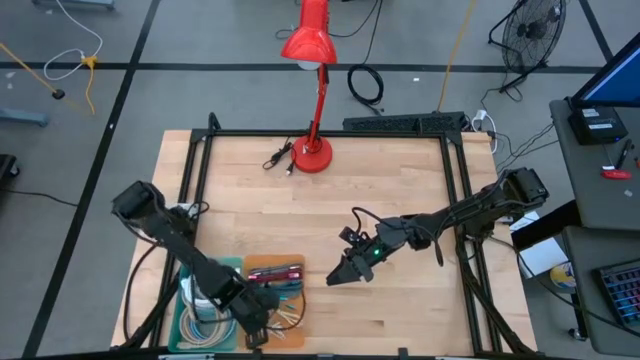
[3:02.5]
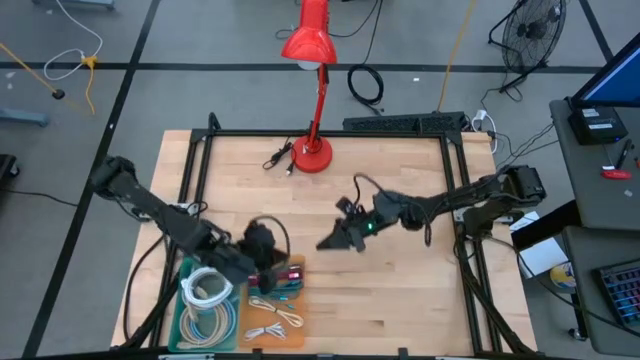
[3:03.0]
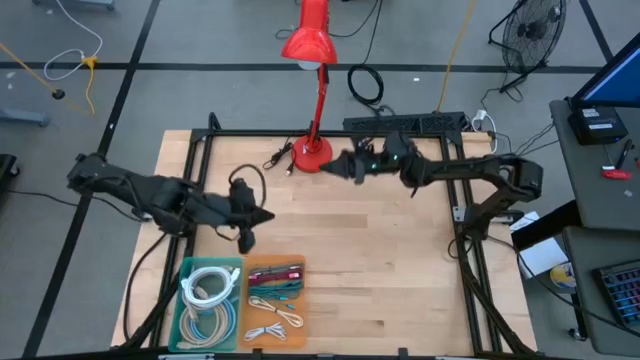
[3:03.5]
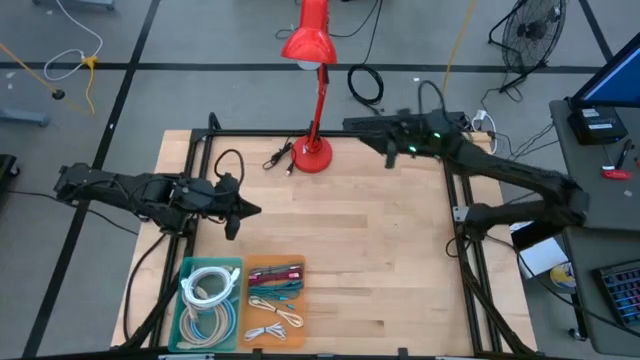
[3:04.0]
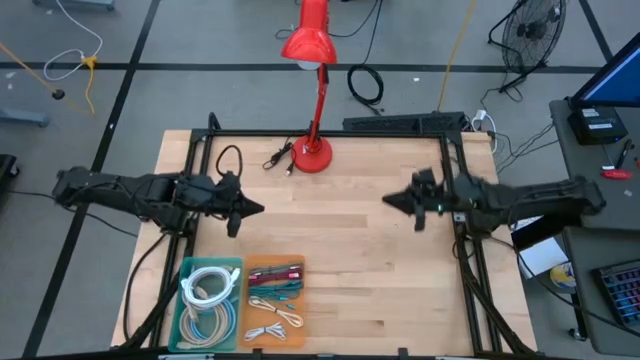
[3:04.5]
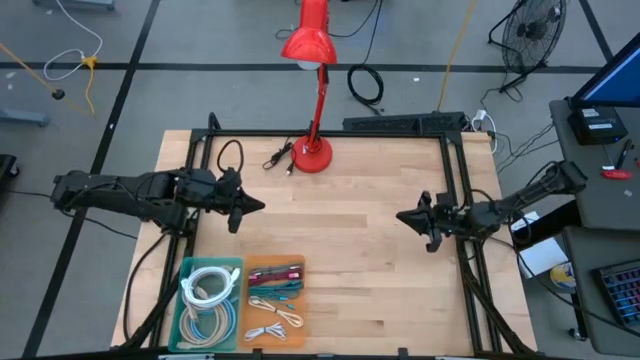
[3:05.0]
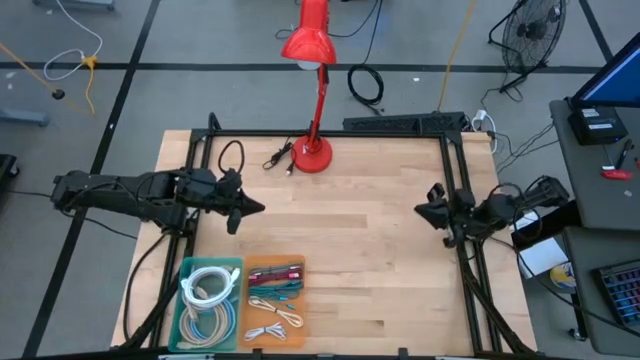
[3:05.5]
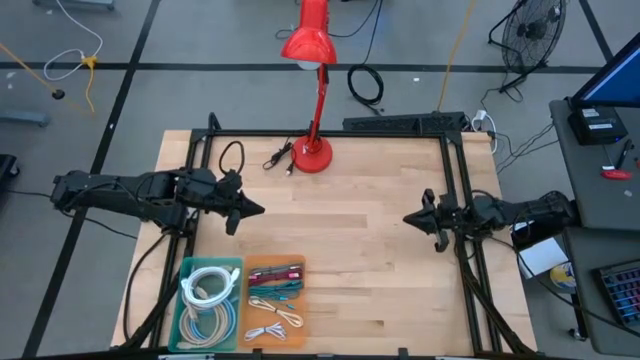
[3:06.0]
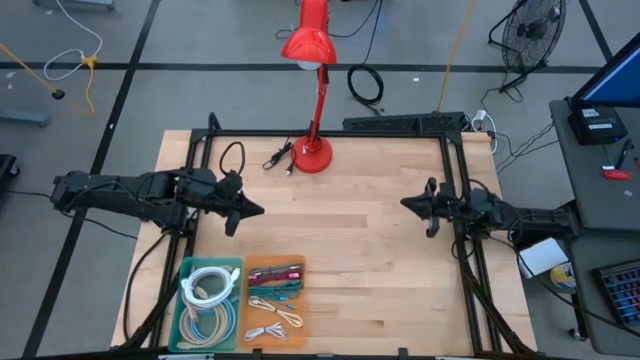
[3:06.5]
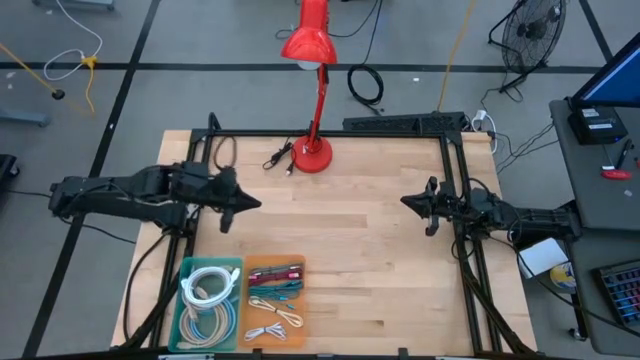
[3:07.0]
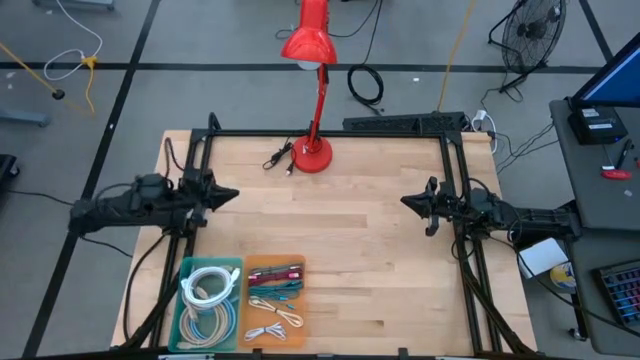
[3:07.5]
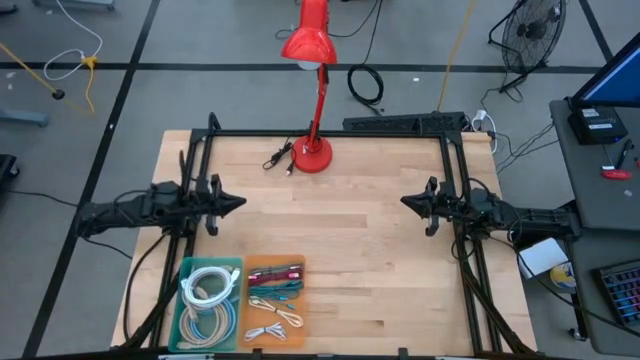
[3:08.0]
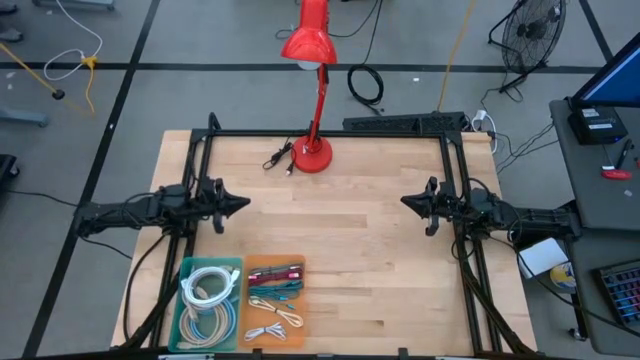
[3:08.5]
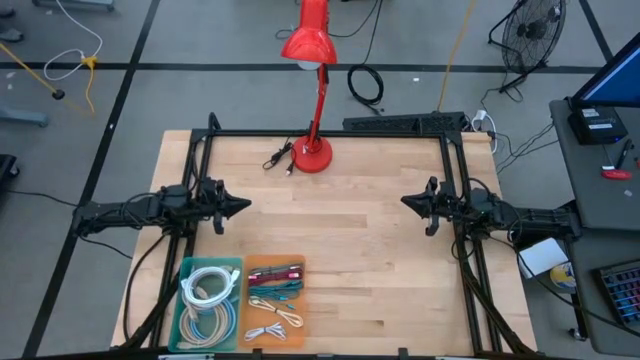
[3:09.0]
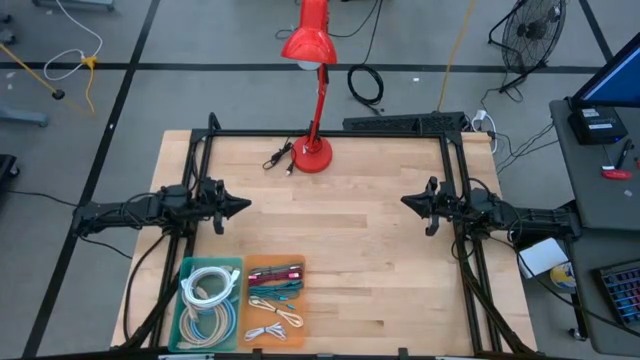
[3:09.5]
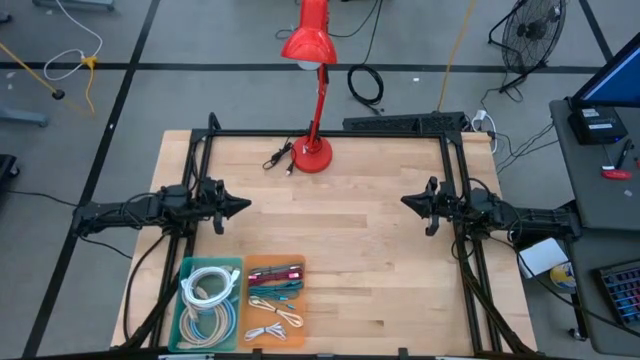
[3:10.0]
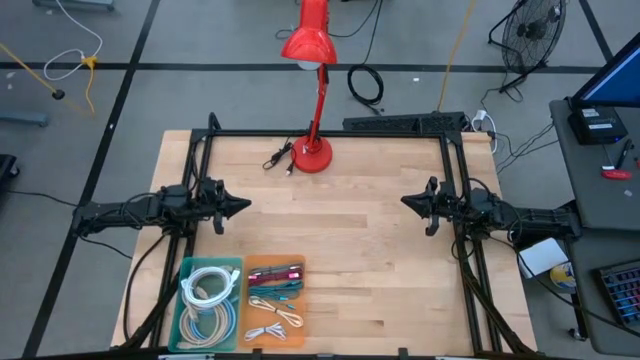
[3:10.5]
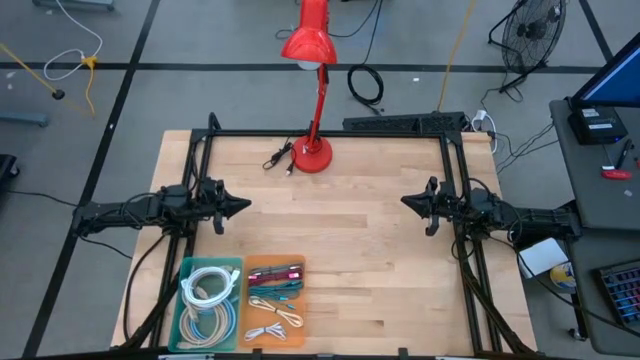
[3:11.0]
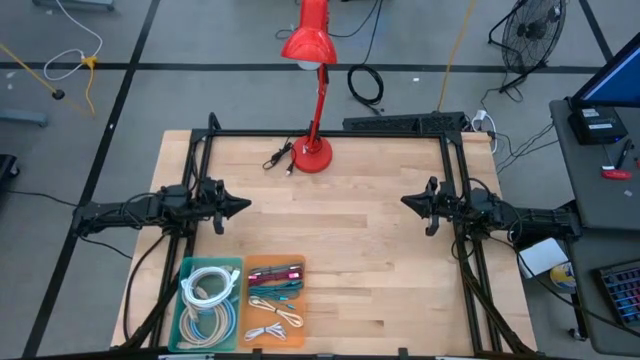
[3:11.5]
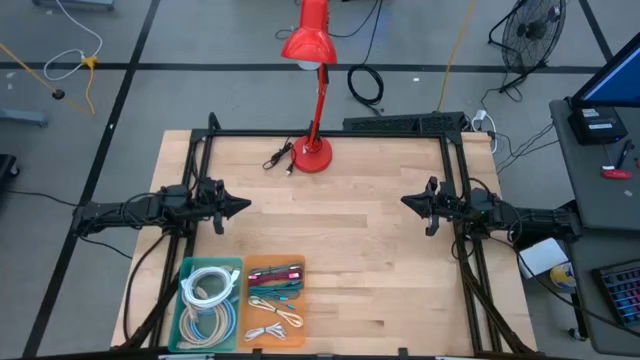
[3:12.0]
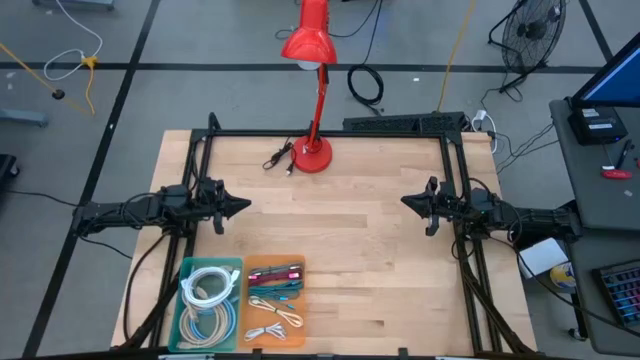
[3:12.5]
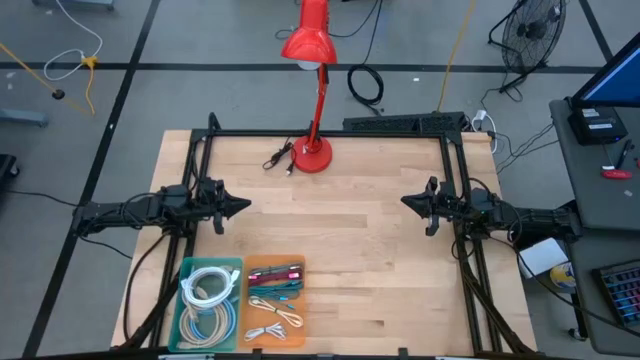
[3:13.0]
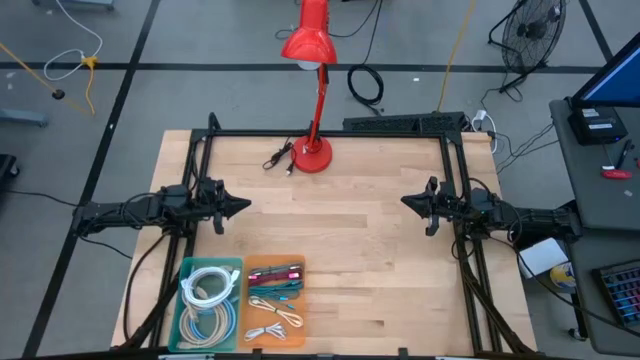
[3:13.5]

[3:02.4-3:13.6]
Task: Pick & Place USB Port
Return to Home Position

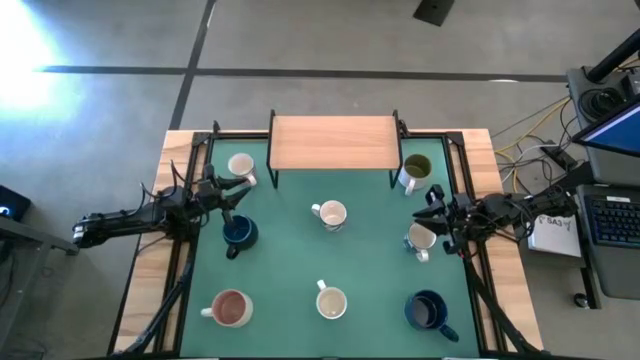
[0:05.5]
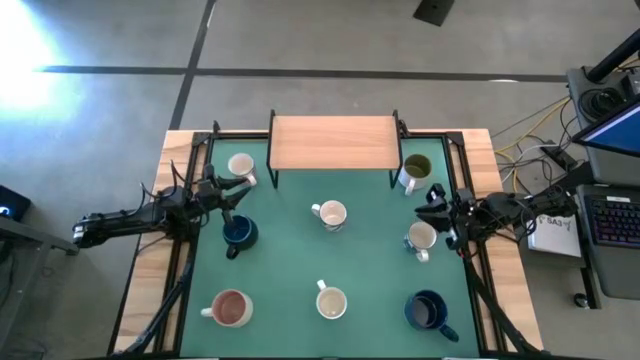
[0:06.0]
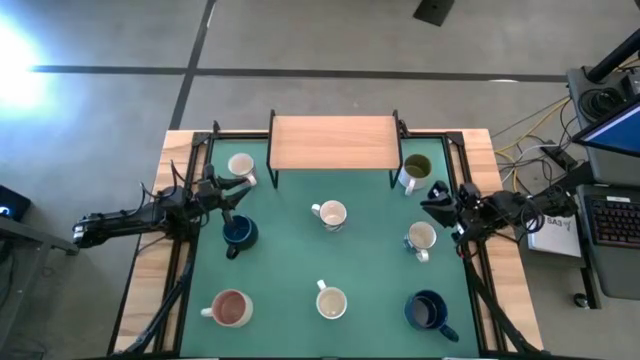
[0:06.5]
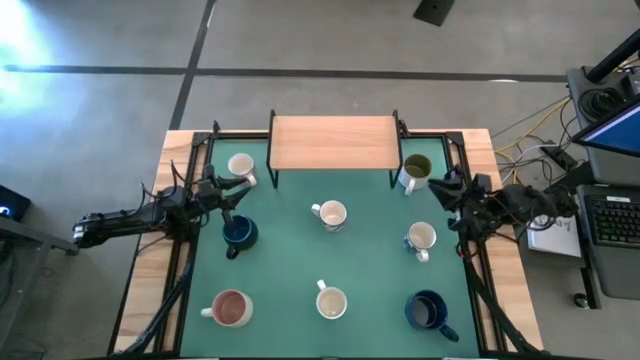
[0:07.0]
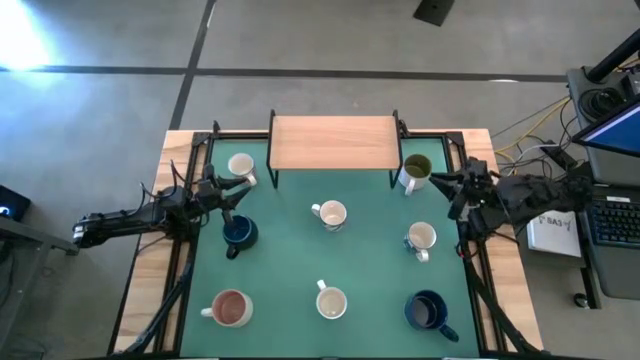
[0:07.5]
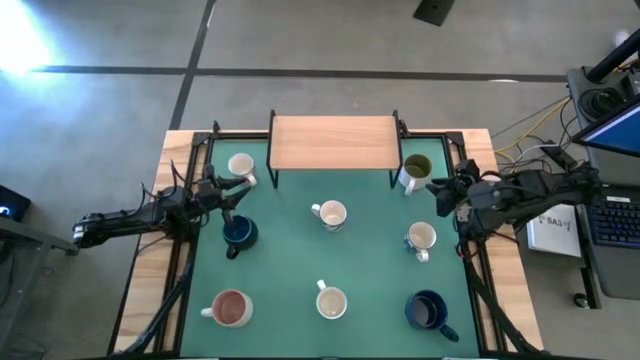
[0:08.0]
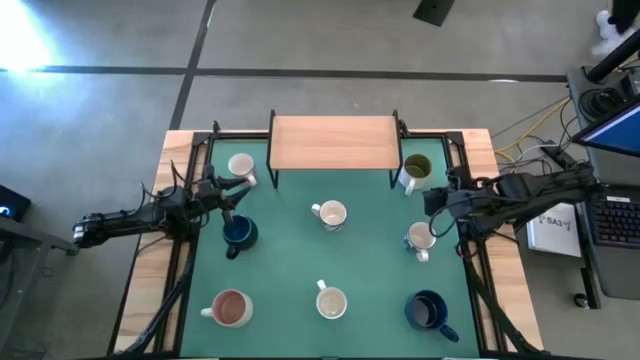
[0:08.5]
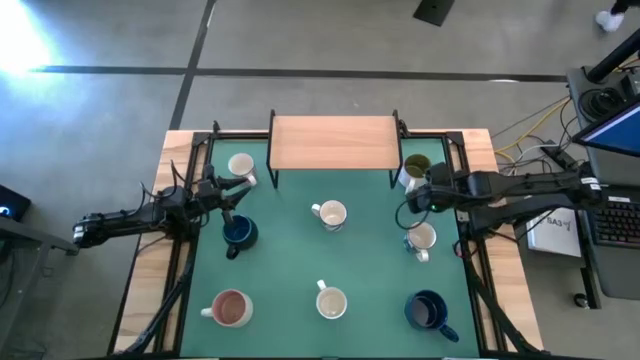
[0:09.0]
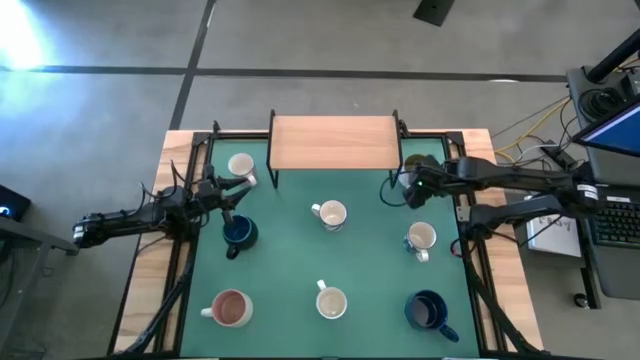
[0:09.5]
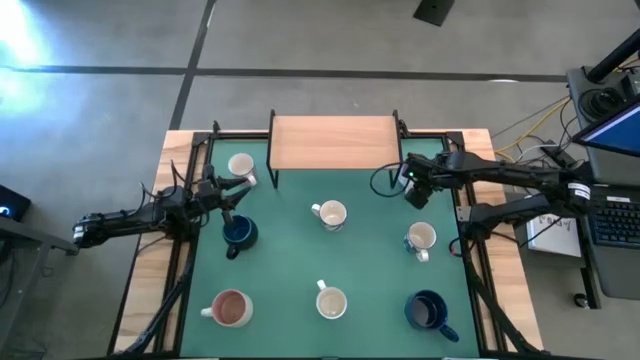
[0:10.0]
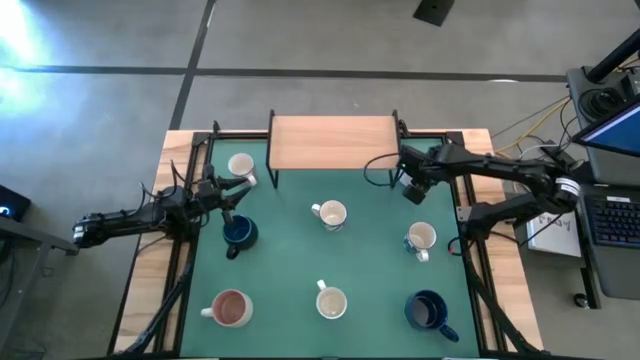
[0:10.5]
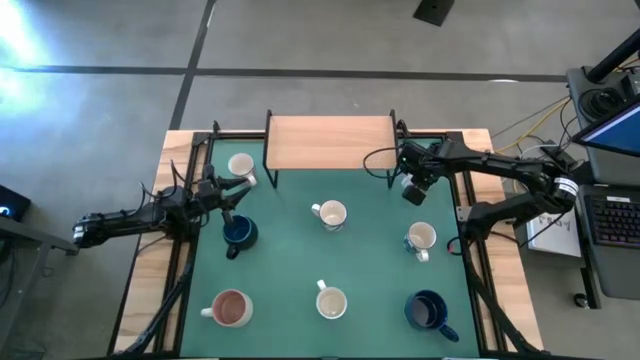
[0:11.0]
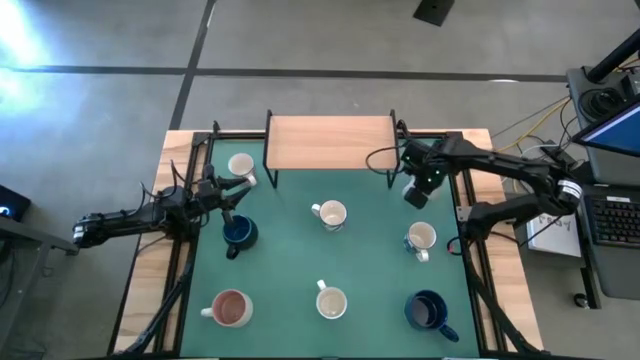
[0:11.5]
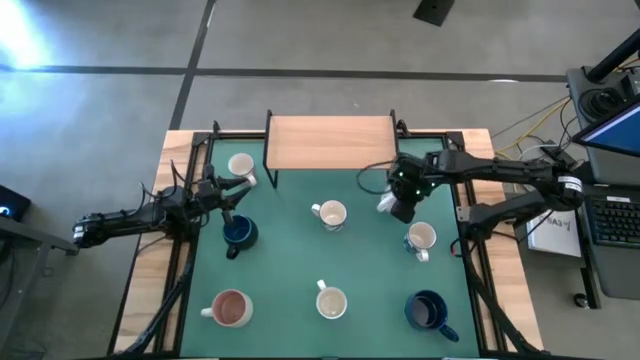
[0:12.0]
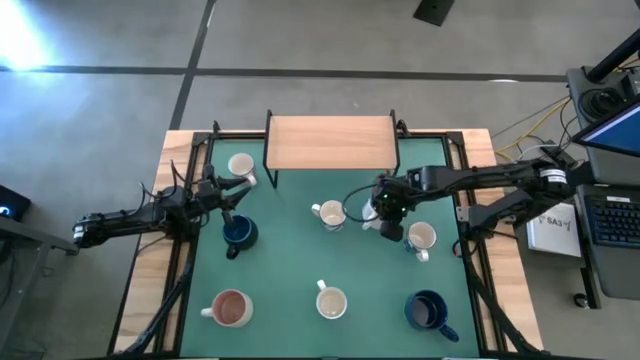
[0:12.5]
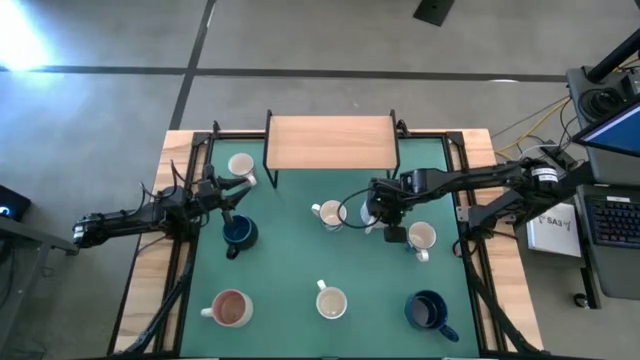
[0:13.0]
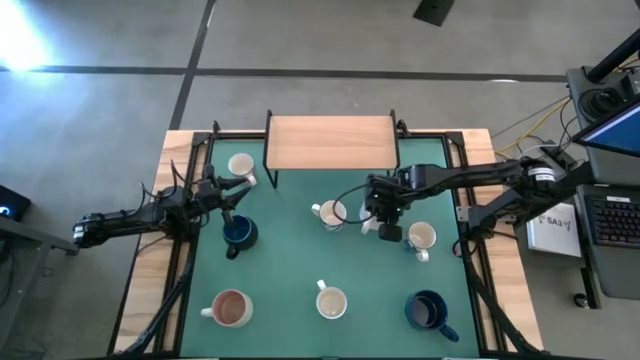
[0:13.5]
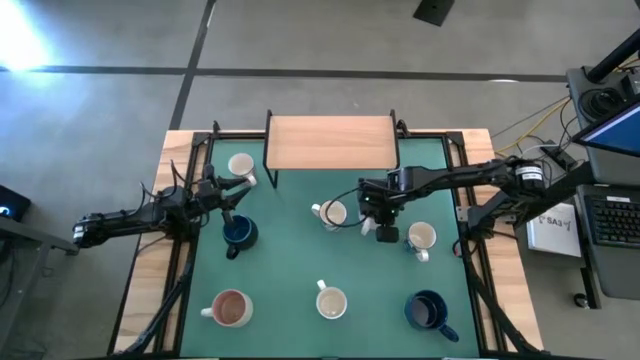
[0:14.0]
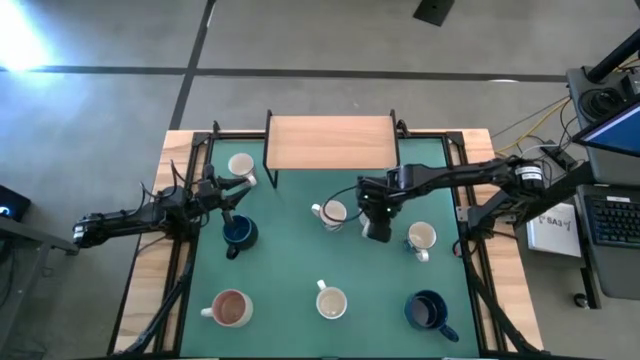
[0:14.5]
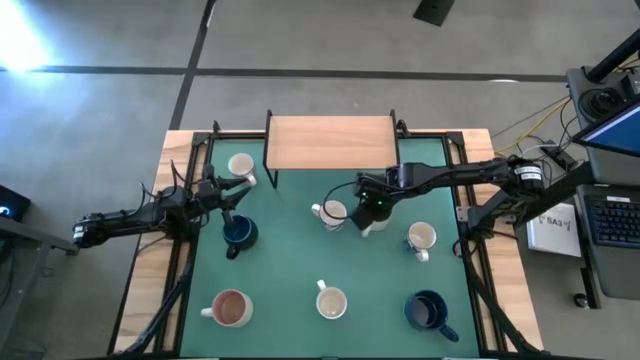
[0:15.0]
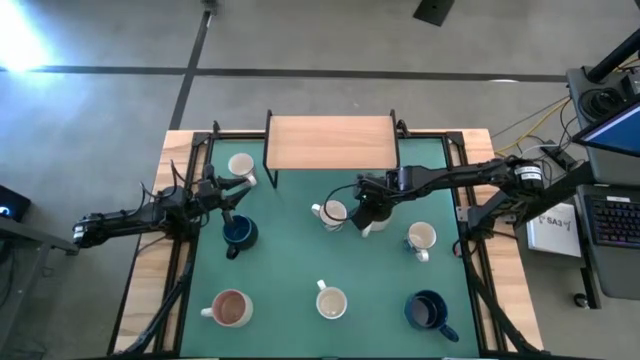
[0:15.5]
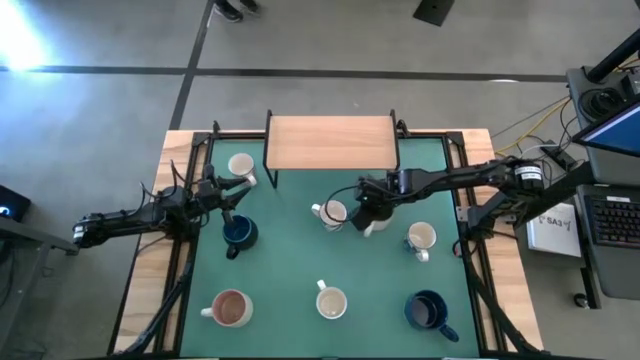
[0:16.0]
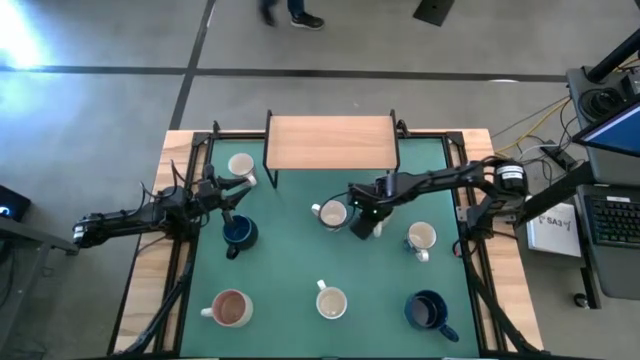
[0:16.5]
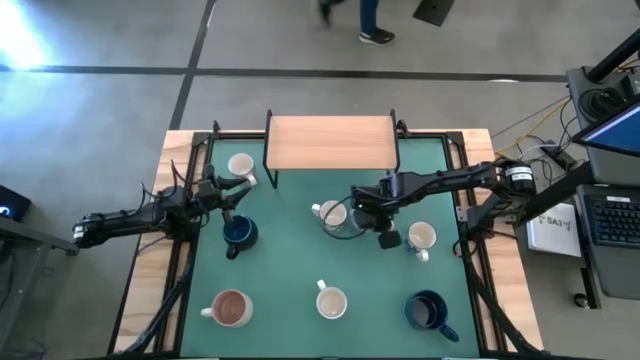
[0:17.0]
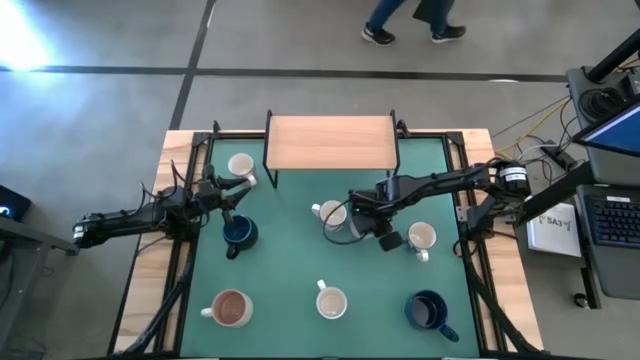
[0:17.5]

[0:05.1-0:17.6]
Task: Place coffee mugs
Put the white mug on the shelf
